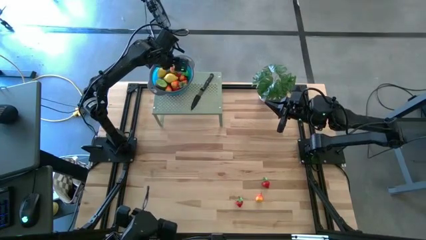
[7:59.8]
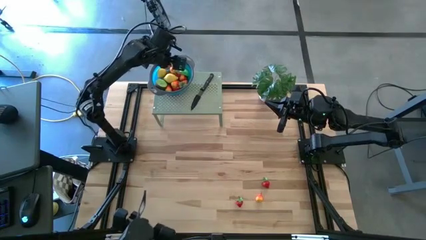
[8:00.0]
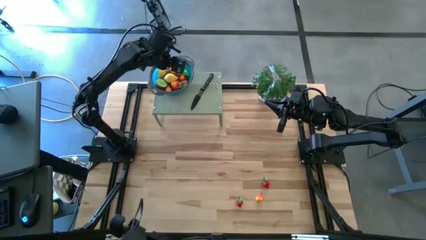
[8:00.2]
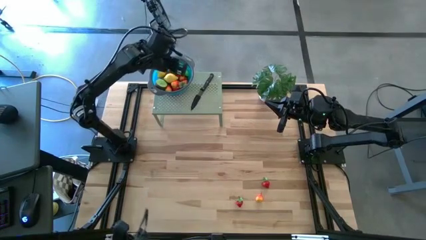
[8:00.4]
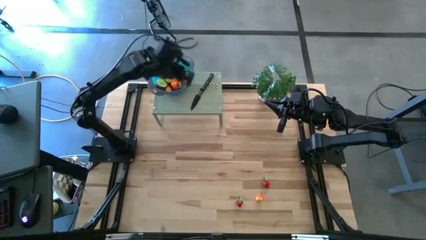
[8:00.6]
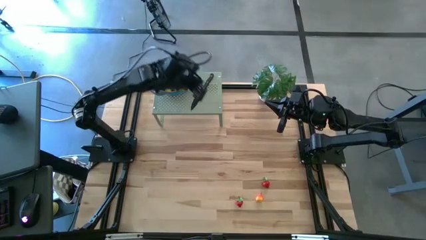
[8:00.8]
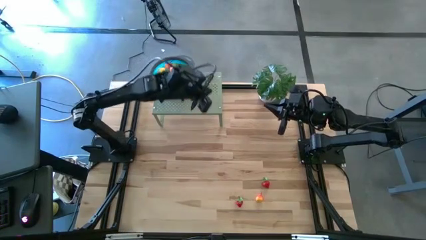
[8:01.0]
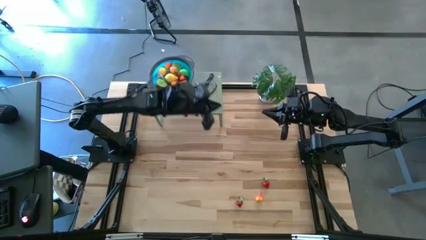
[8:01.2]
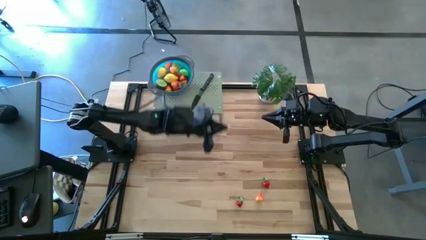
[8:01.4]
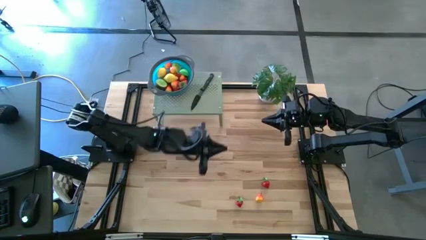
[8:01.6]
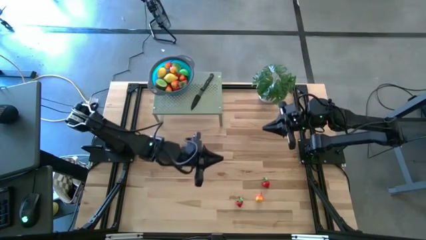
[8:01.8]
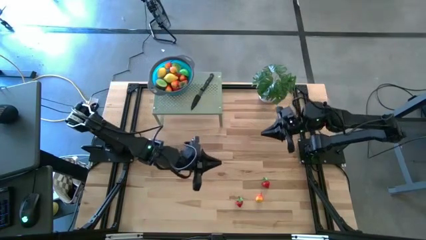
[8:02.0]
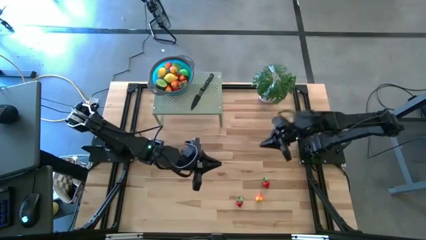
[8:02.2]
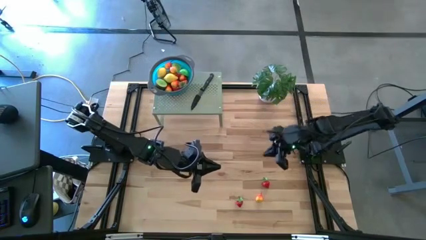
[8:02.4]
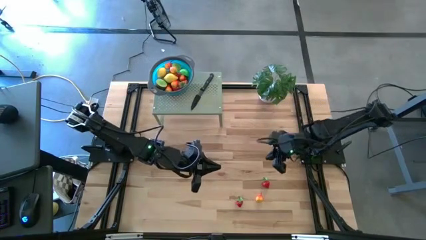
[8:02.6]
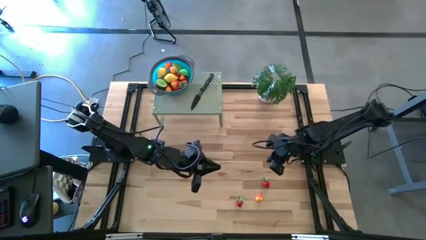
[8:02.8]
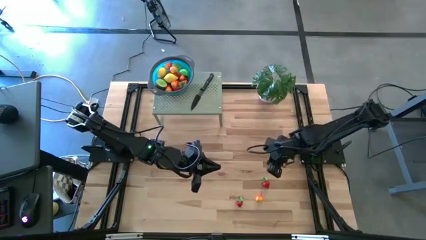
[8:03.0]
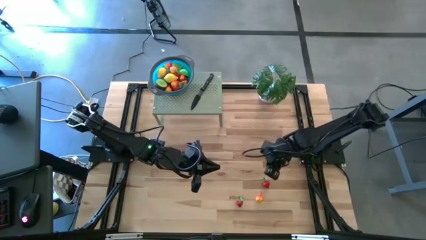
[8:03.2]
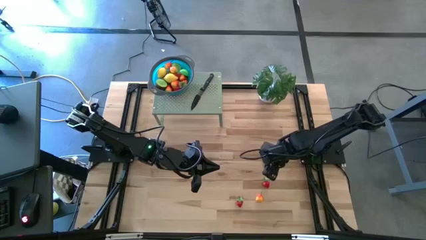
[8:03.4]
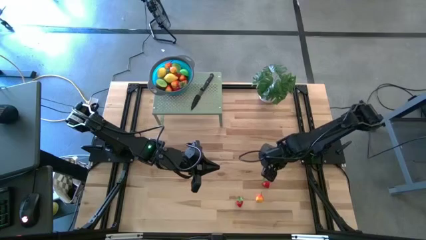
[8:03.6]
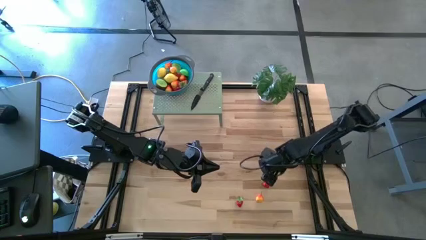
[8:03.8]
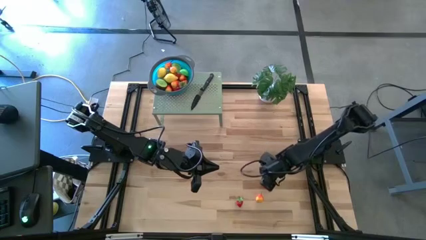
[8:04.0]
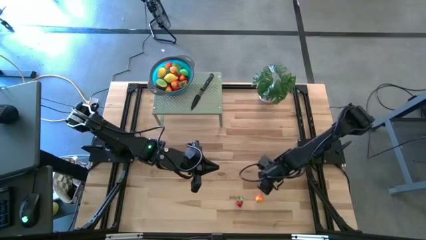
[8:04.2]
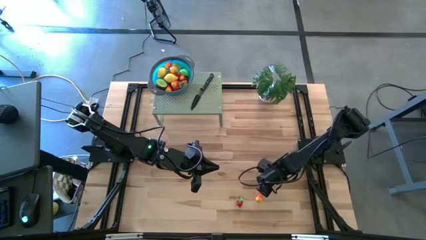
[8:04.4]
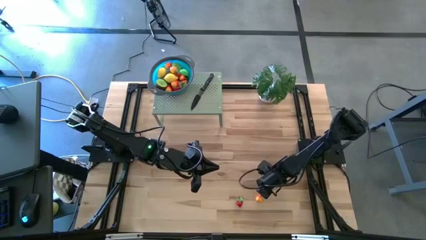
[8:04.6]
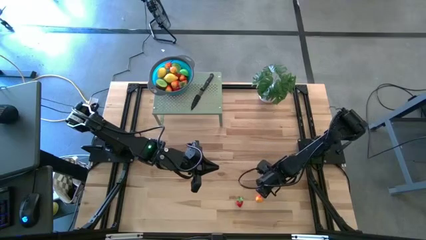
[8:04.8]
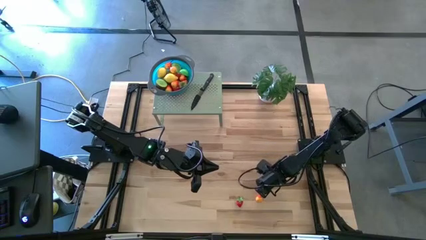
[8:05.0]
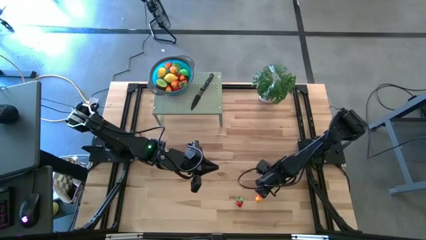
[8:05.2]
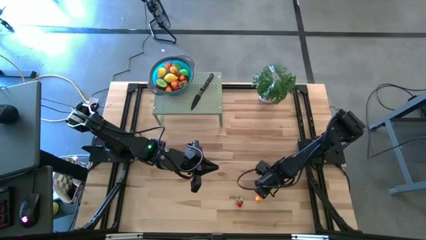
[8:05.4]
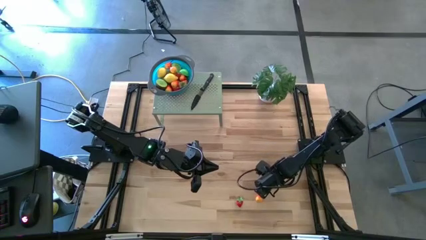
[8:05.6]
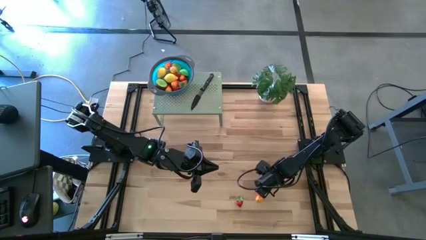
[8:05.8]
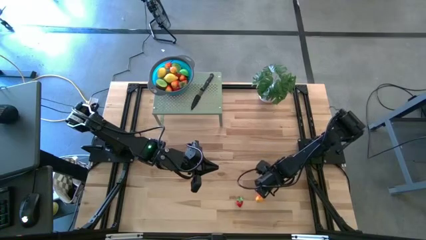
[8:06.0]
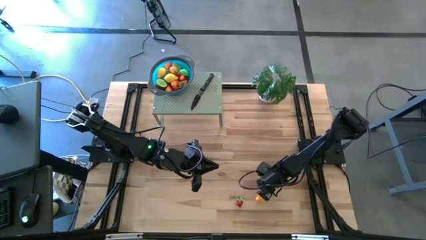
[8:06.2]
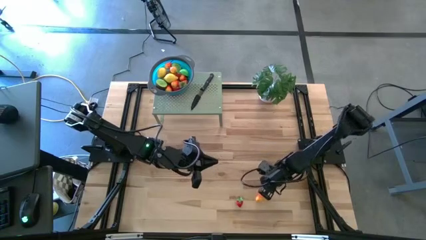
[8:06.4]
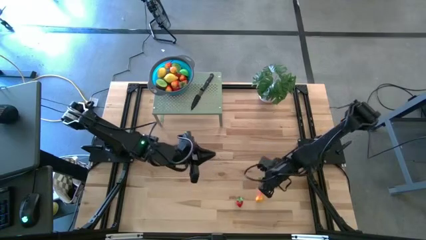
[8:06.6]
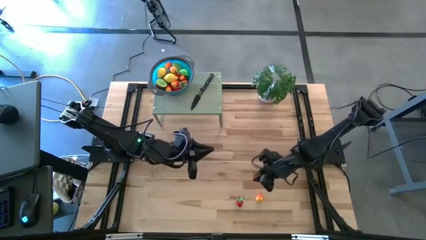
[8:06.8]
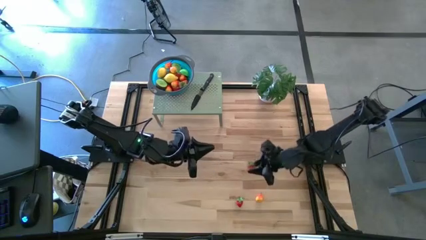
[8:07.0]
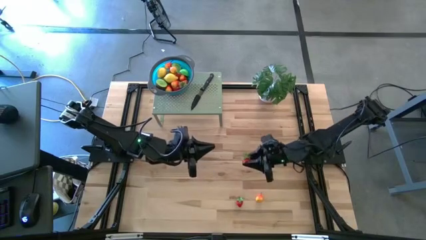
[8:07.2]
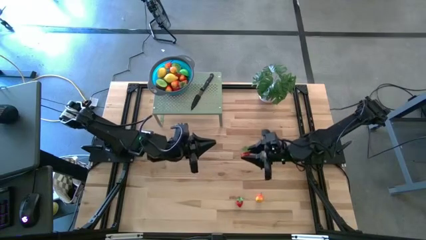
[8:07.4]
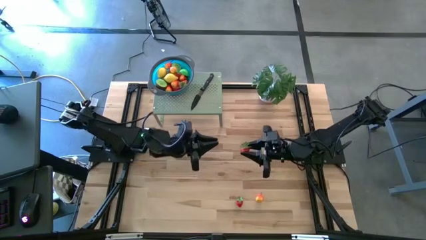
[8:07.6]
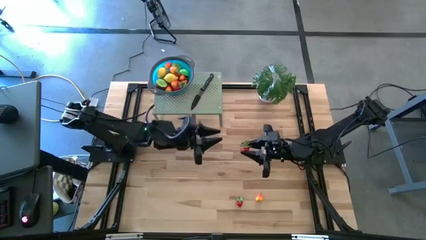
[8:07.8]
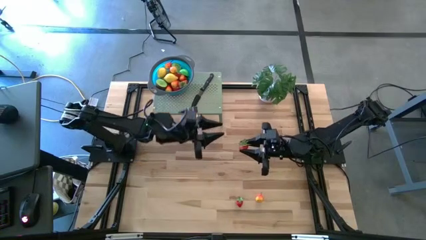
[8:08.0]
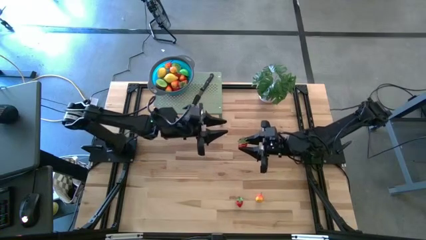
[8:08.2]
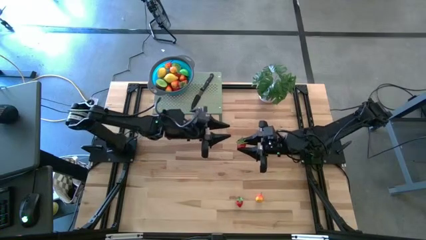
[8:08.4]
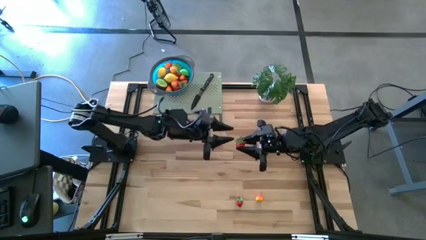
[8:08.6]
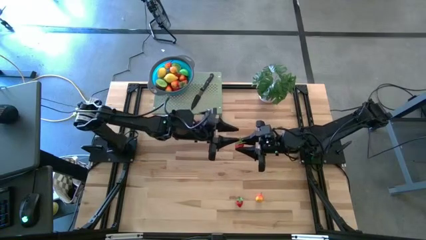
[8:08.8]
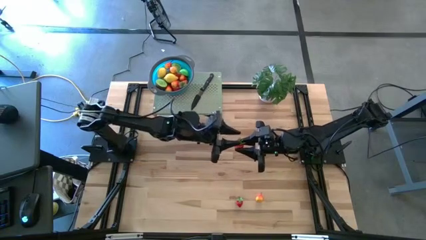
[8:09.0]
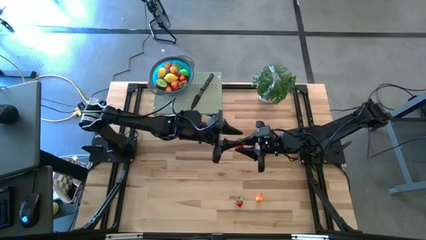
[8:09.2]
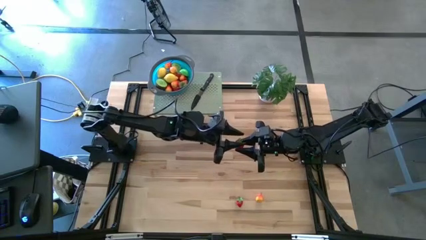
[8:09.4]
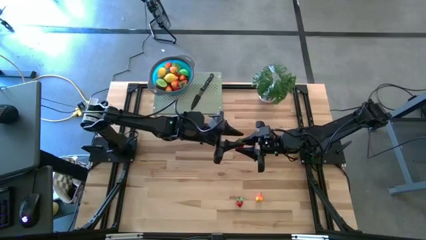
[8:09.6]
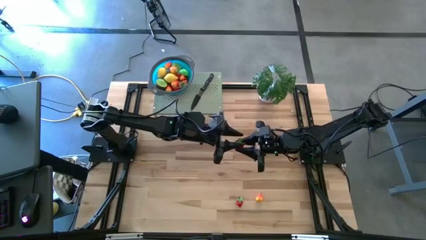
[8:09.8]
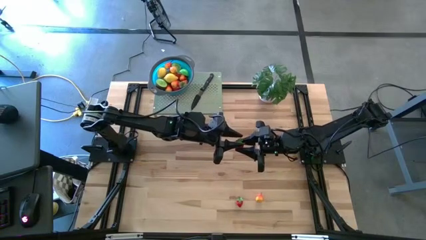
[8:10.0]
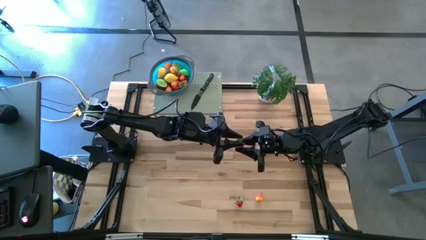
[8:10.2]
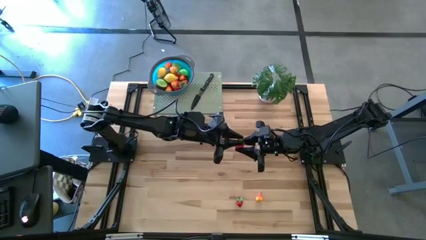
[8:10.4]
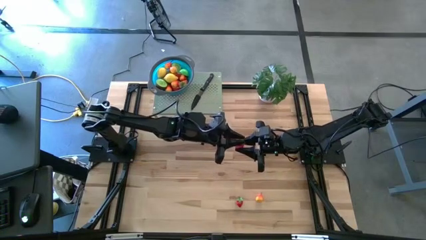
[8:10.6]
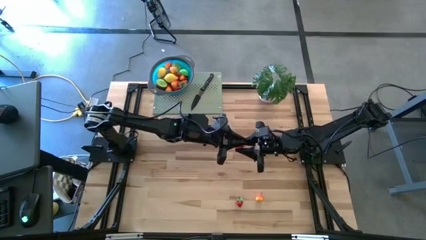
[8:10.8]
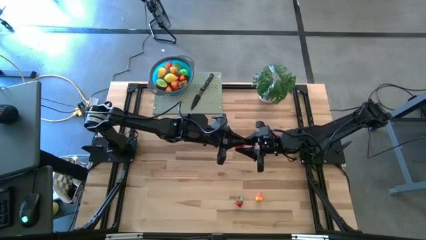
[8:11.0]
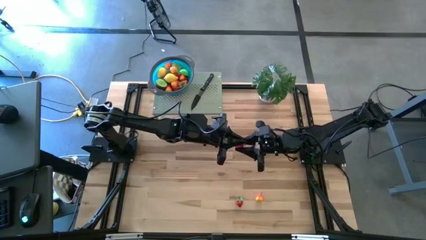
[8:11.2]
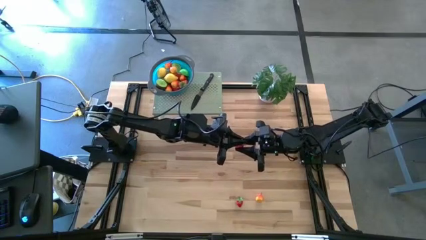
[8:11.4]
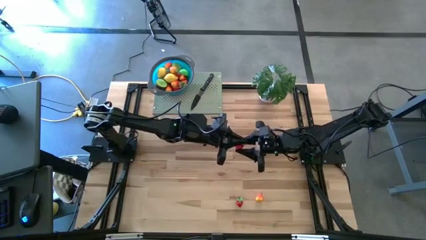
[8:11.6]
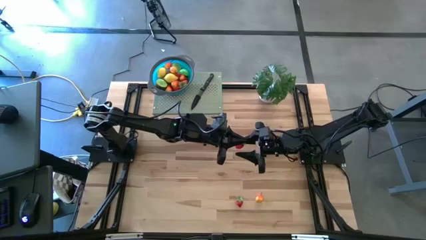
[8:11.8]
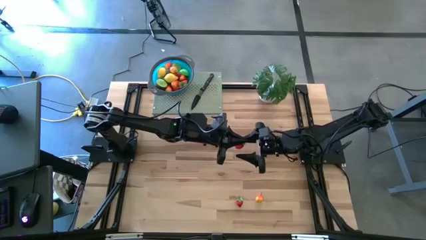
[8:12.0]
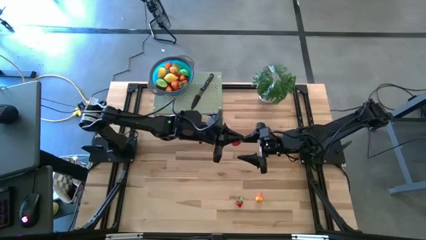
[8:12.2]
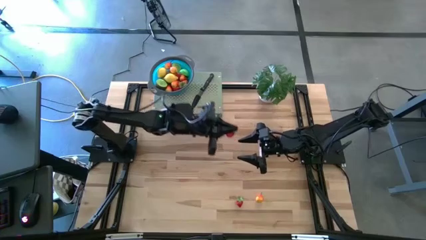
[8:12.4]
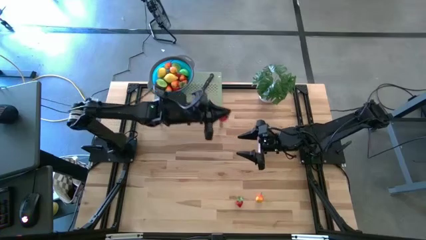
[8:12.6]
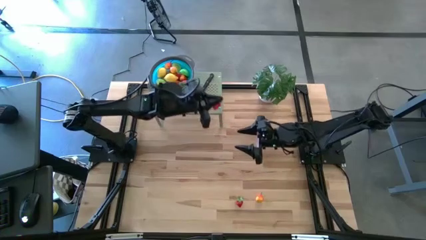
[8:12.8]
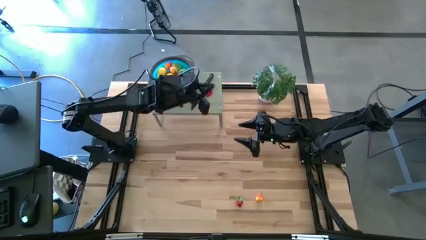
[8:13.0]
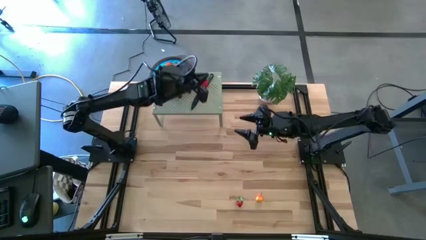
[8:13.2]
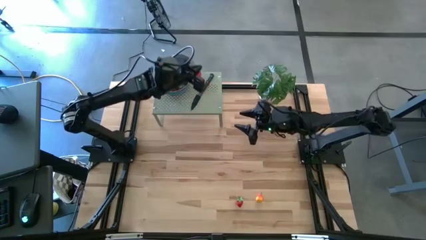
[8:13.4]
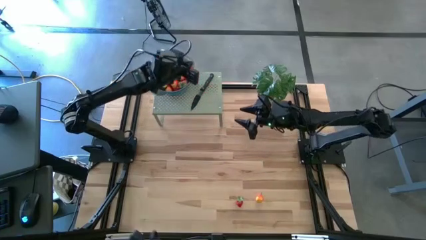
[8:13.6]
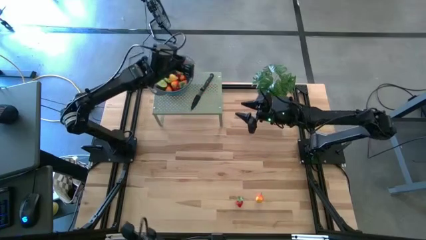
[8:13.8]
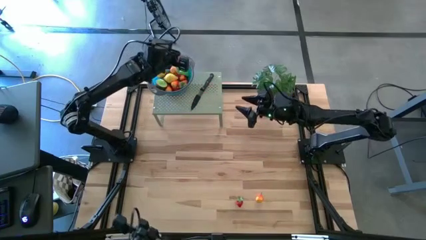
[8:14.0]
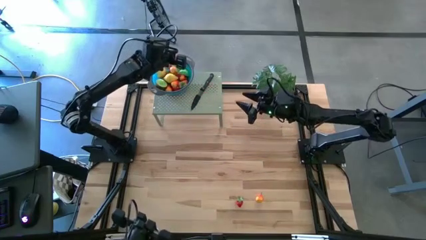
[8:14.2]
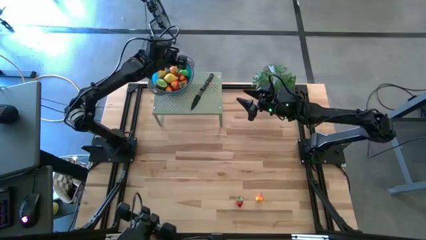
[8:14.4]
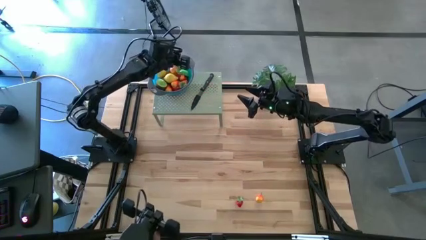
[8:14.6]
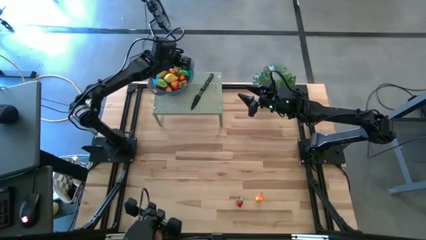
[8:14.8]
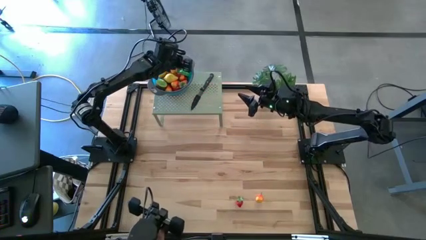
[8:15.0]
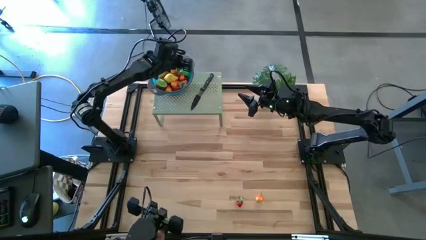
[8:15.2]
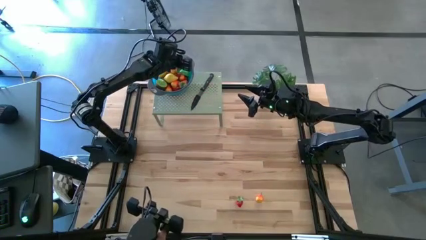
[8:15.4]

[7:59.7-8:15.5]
Task: Pick & Place Fruit
Put the strawberry into the strainer bowl on the shelf
